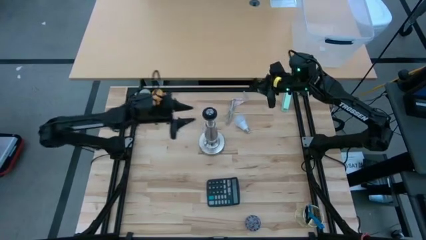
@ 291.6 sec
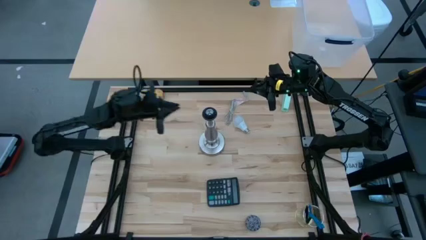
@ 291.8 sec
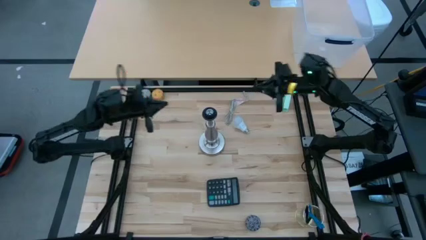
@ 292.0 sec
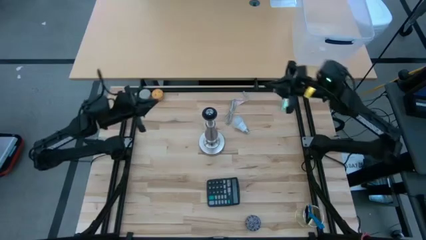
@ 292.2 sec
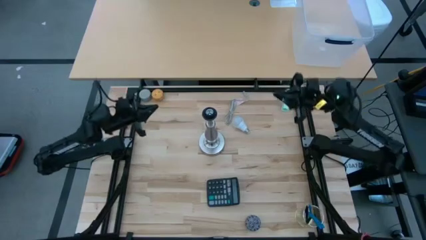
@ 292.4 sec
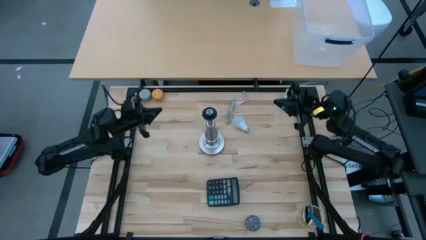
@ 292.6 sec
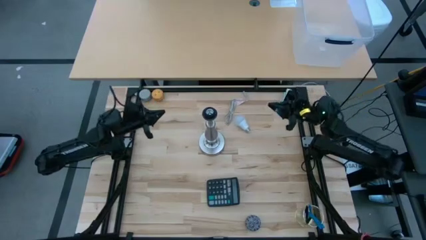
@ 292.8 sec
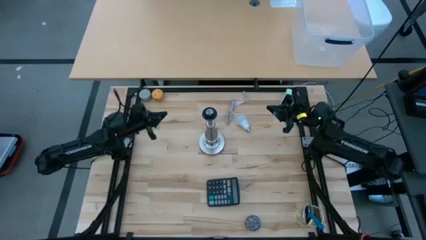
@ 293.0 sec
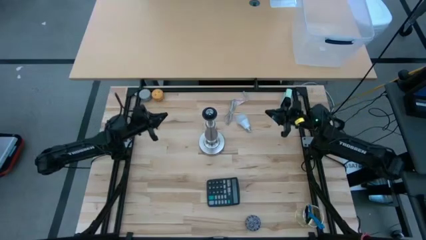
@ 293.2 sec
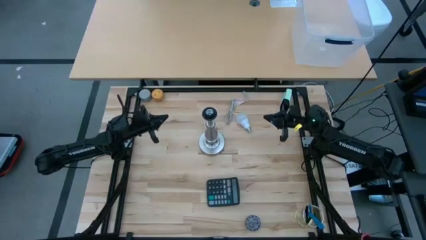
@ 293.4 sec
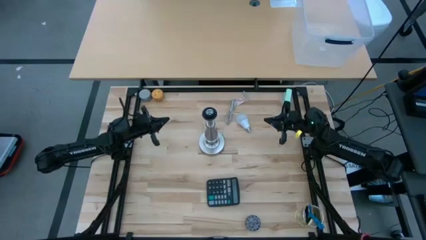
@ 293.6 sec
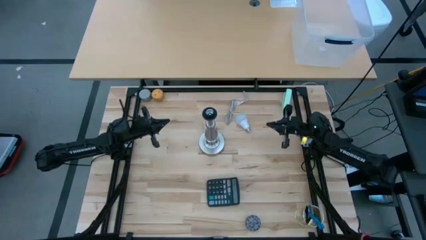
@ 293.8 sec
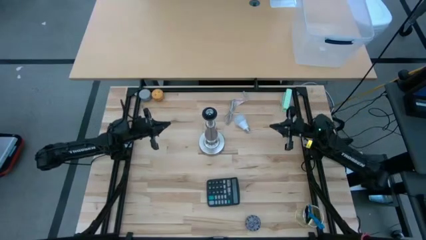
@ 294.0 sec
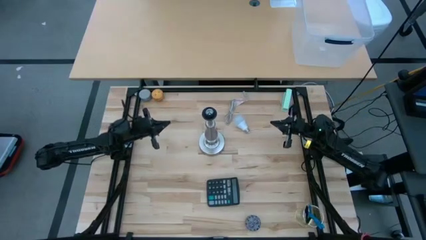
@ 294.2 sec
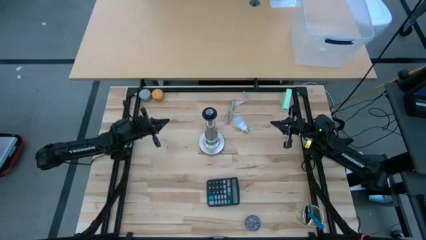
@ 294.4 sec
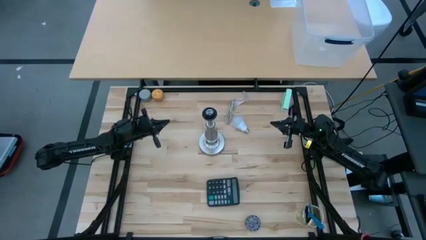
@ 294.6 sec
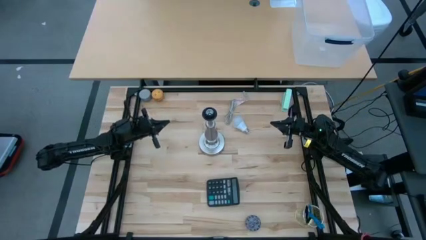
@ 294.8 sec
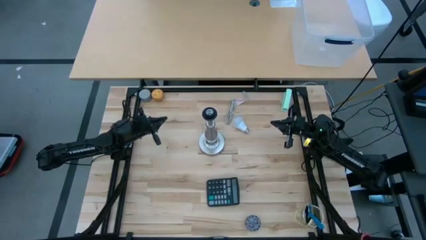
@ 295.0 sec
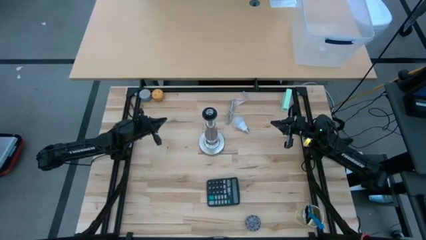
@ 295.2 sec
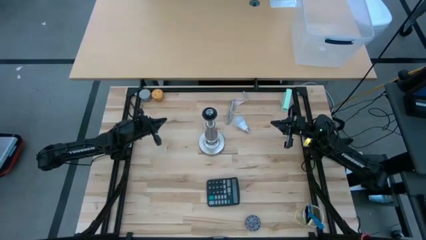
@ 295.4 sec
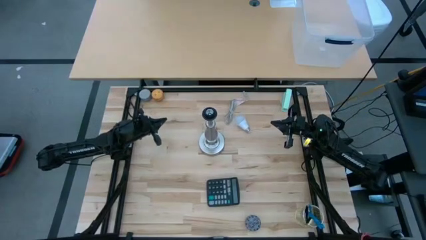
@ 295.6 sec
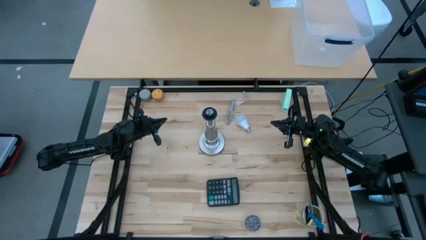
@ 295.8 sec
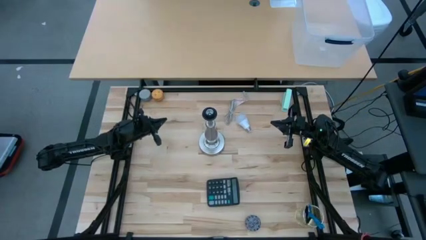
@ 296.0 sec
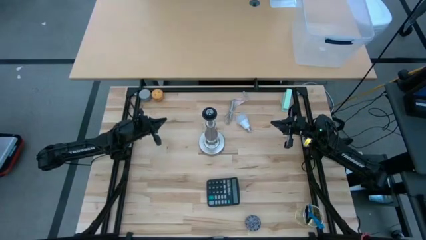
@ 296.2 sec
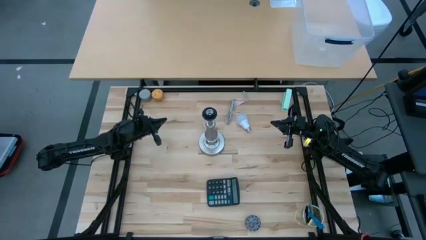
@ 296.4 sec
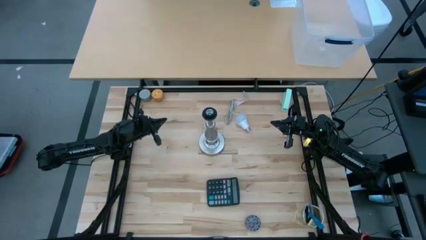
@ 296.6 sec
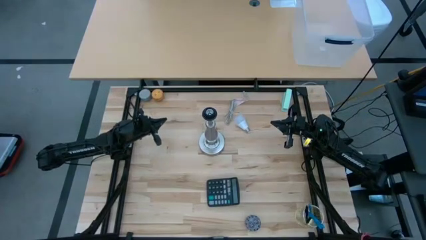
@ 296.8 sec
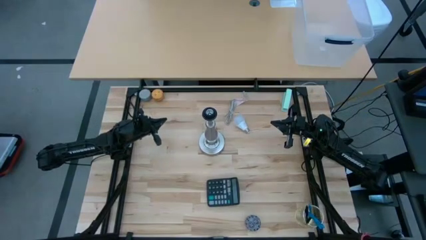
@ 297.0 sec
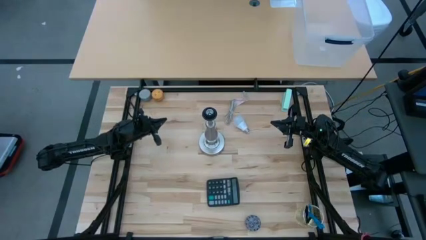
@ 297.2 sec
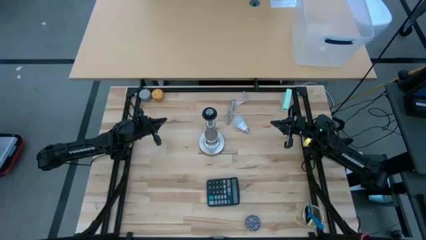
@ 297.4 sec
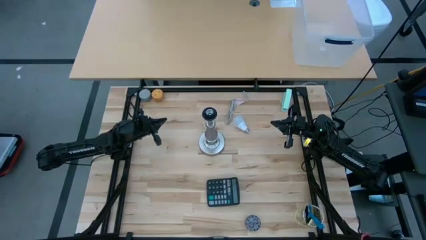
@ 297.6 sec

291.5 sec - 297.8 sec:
Task: Screw lightbulb
Return to Home Position

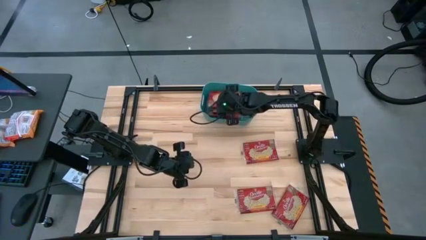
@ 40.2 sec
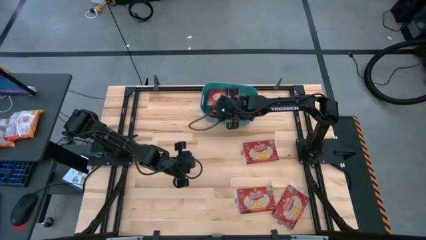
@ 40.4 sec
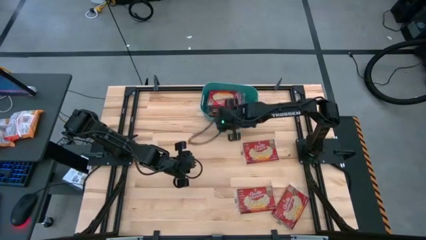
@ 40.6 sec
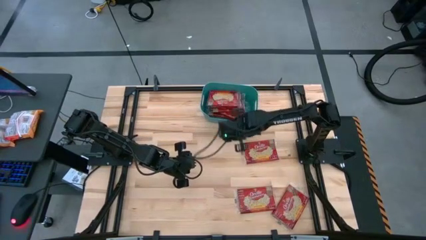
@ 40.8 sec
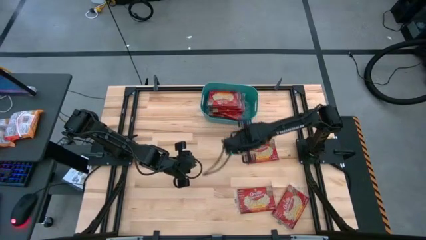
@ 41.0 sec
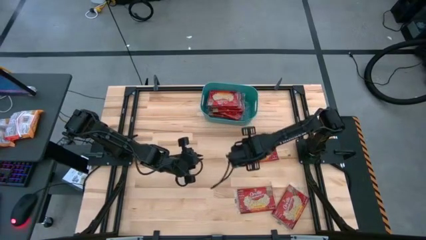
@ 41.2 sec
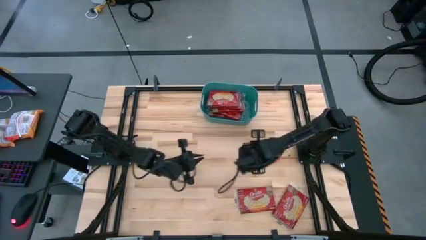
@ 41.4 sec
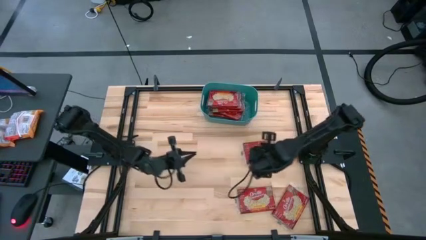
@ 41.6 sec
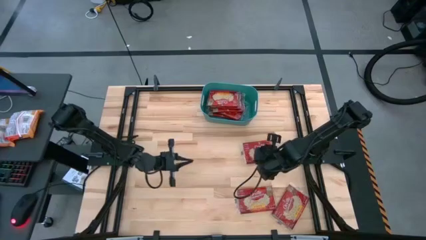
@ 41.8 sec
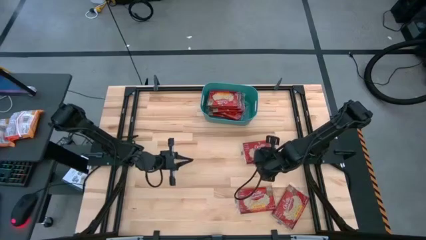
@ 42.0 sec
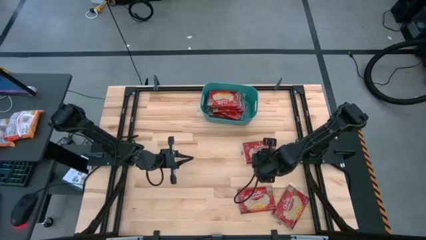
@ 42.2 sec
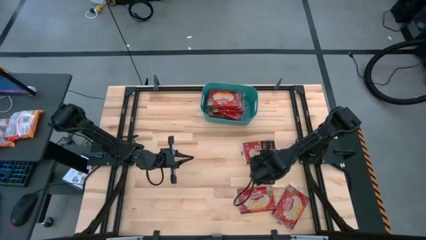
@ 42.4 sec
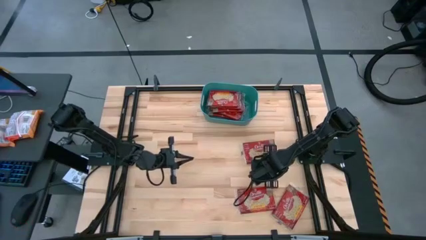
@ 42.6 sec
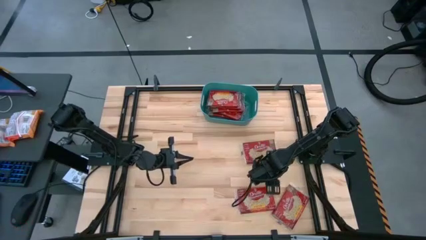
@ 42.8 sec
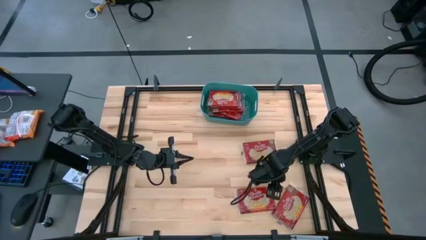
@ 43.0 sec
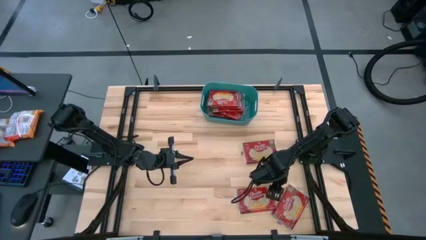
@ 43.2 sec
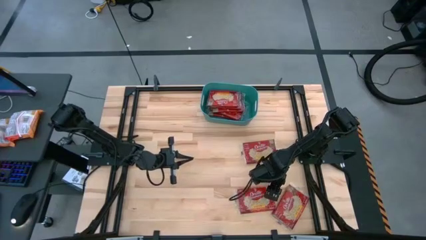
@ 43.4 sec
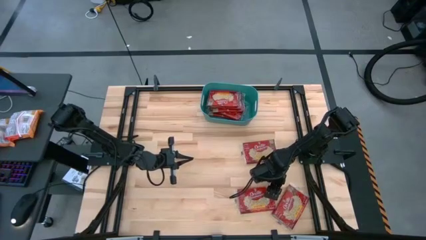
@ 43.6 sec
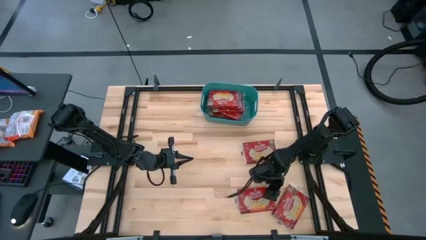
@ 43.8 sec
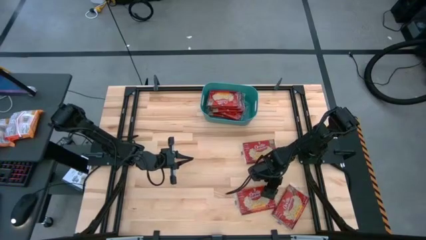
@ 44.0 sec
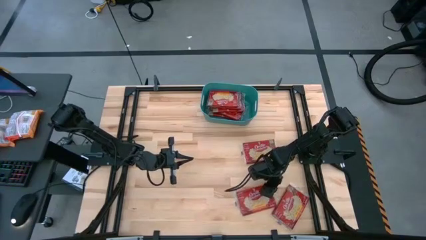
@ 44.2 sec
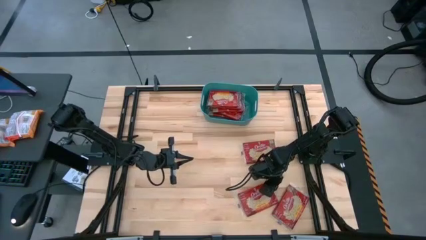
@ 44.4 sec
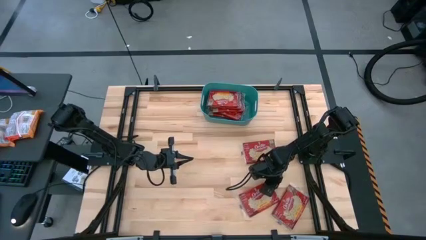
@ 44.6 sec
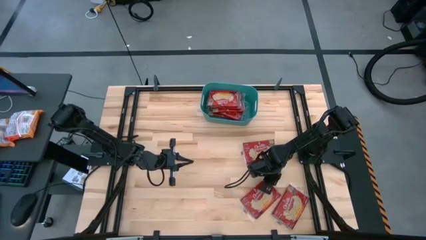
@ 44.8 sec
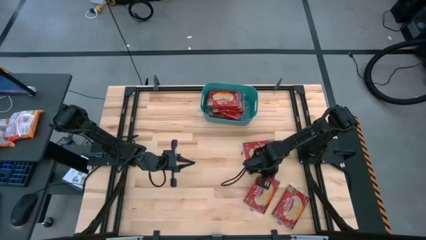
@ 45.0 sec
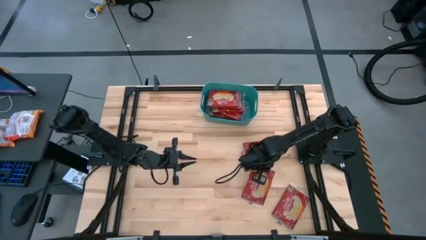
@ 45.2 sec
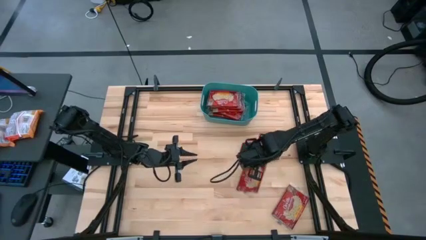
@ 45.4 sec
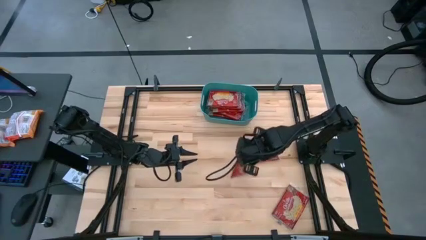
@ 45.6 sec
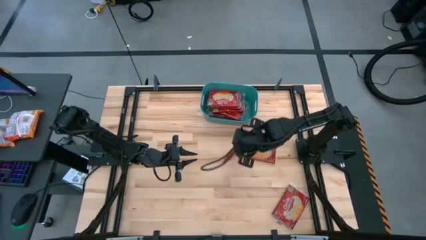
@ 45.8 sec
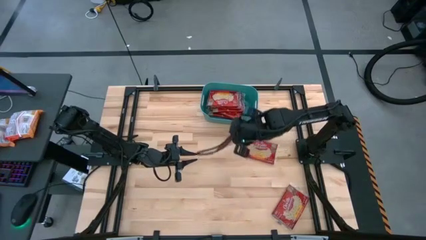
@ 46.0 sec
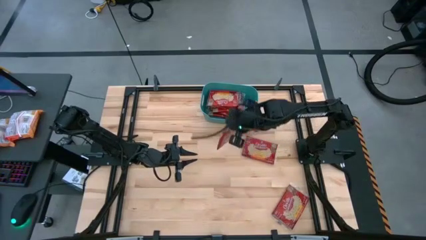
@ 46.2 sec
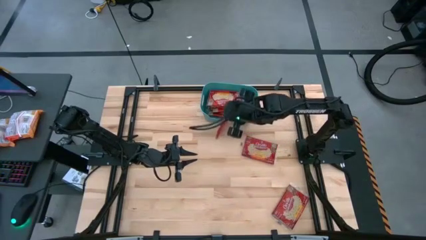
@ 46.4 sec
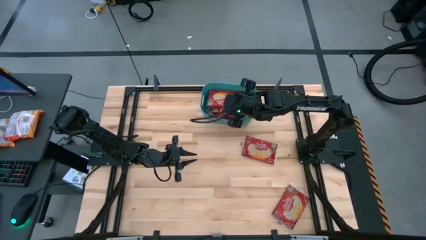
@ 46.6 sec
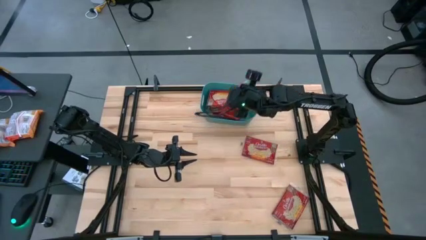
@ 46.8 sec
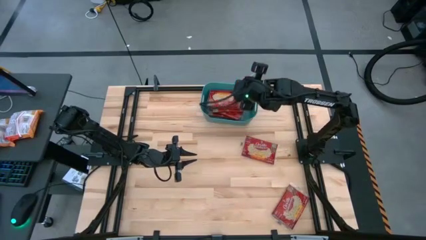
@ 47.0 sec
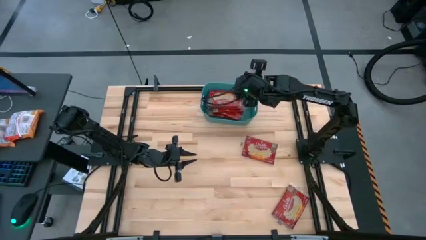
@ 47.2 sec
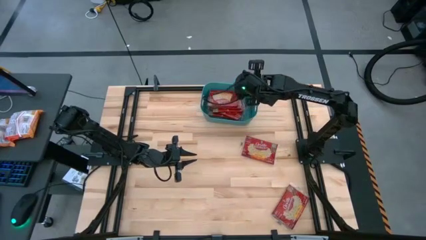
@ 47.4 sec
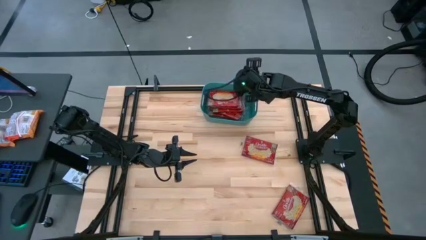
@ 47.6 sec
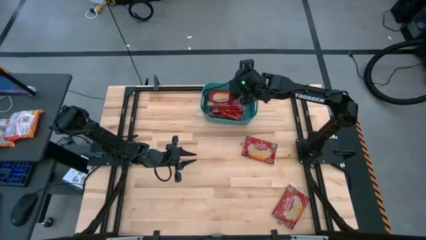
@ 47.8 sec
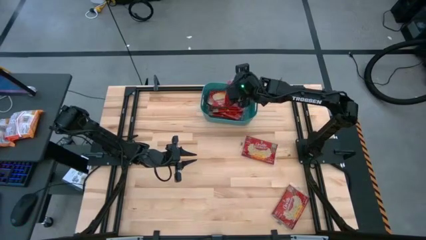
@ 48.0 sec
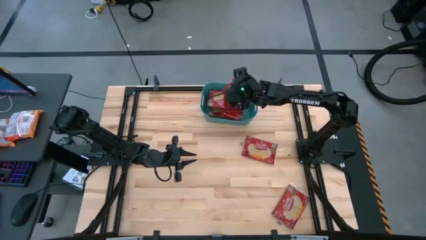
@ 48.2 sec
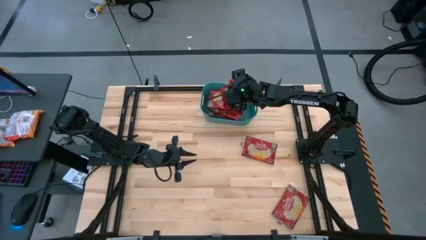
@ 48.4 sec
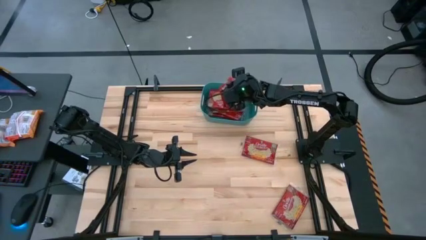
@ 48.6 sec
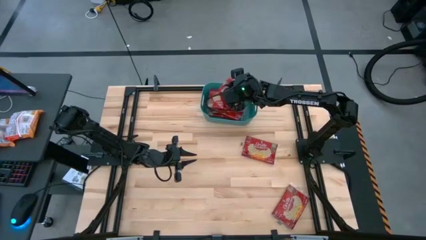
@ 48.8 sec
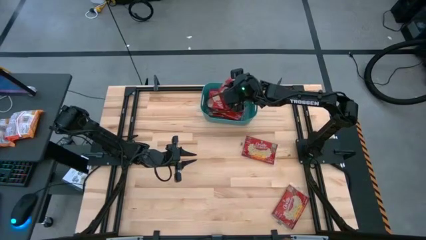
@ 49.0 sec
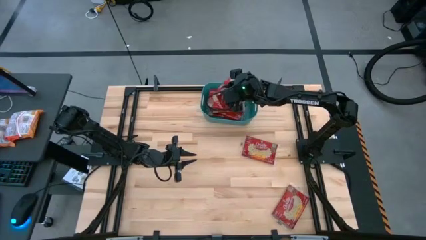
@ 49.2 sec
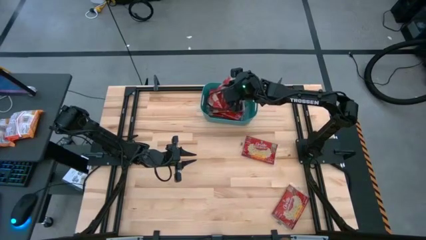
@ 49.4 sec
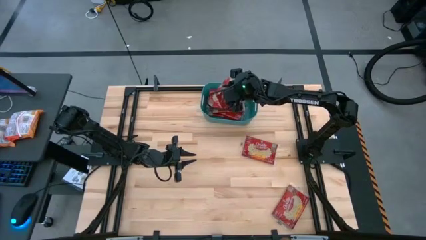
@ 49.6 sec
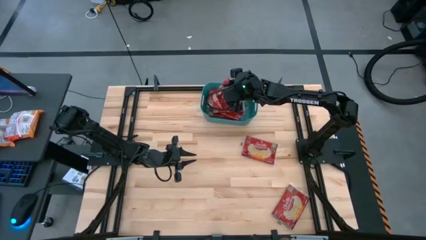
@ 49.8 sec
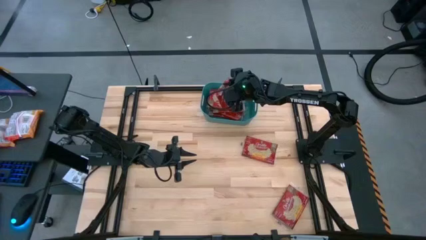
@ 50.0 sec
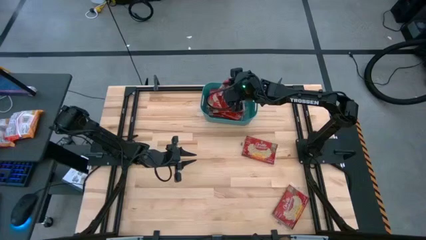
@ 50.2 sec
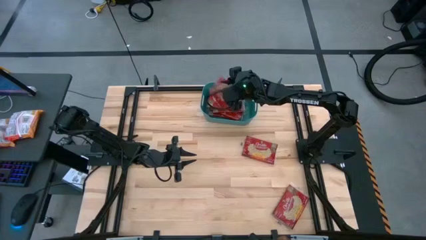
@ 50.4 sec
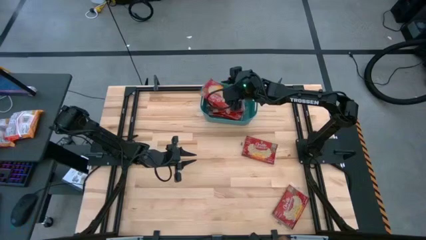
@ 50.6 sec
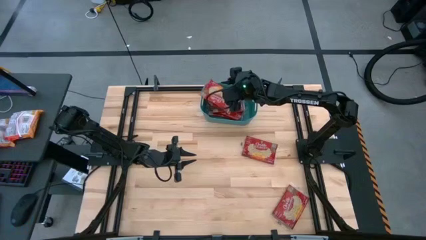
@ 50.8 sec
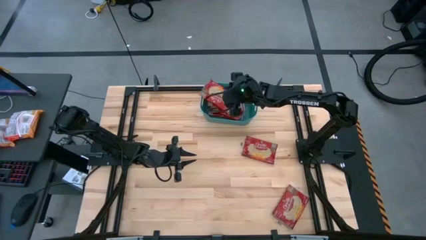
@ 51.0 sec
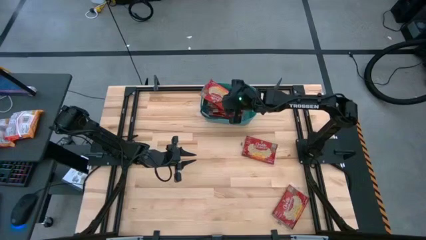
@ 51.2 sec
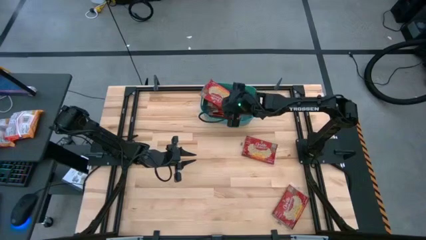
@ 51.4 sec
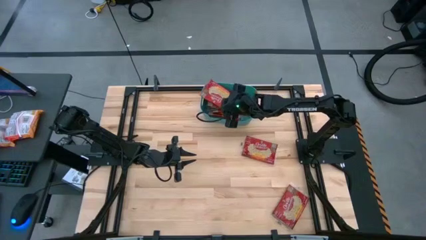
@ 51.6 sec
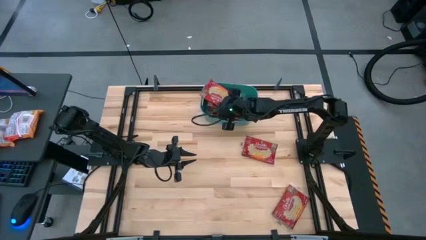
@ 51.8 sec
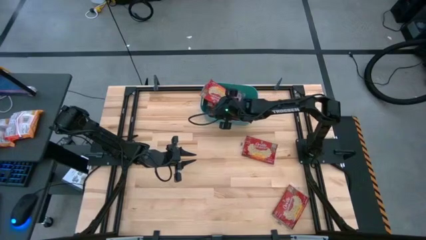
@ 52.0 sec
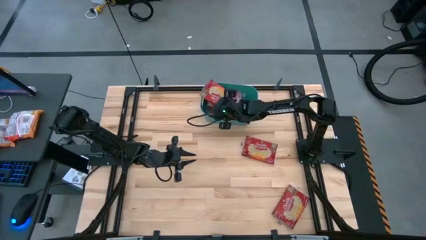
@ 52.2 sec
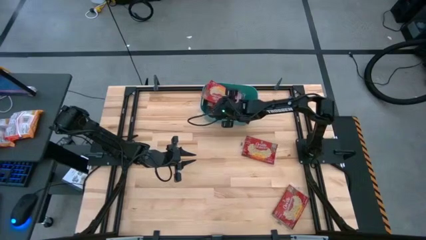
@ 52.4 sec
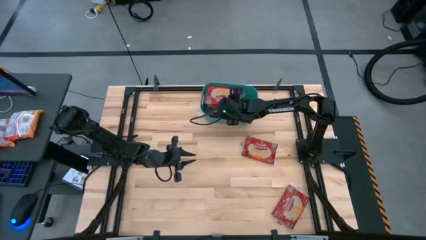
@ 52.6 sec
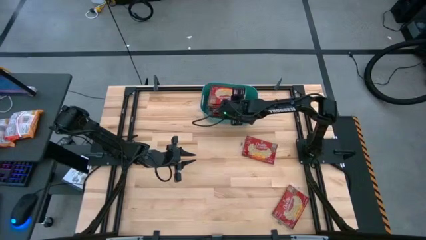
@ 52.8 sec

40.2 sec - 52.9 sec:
Task: Sort popcorn bags into baskets
Put the bottom left red popcorn bag into the blue bin
